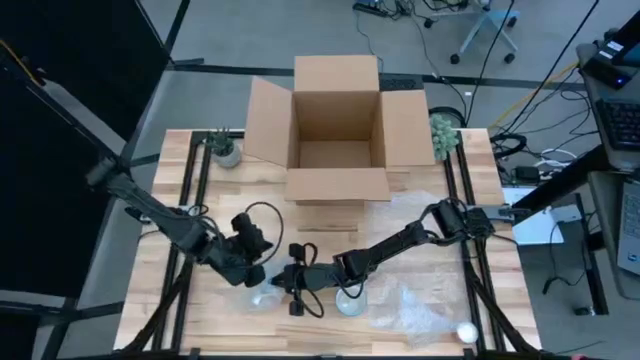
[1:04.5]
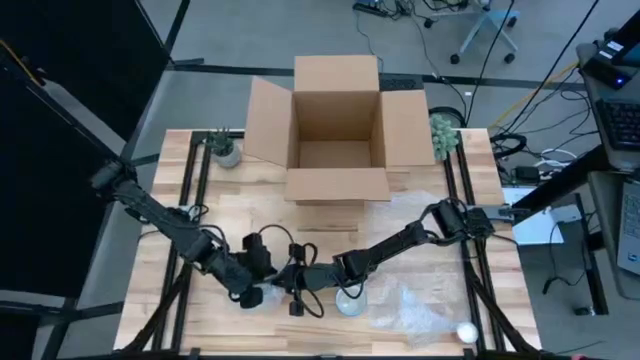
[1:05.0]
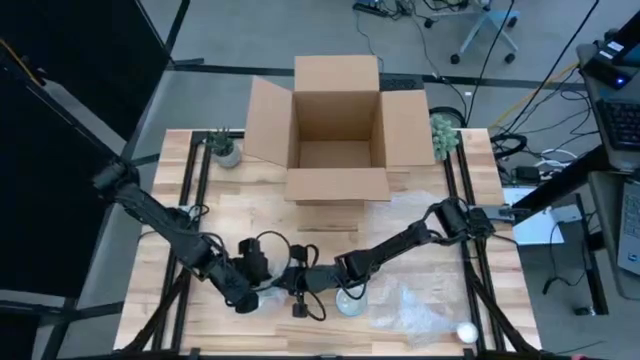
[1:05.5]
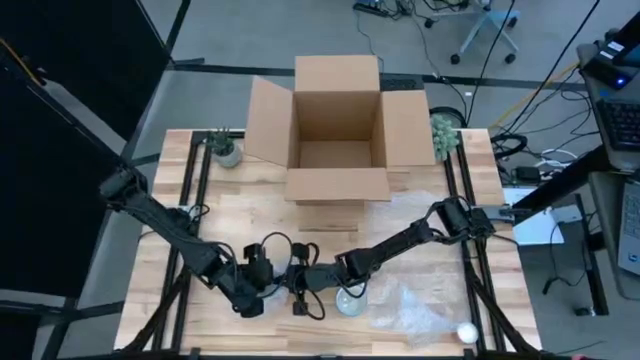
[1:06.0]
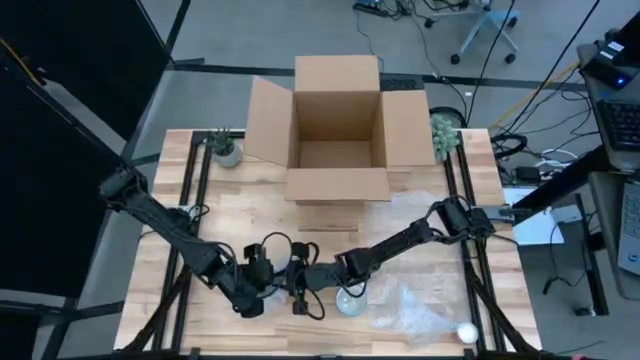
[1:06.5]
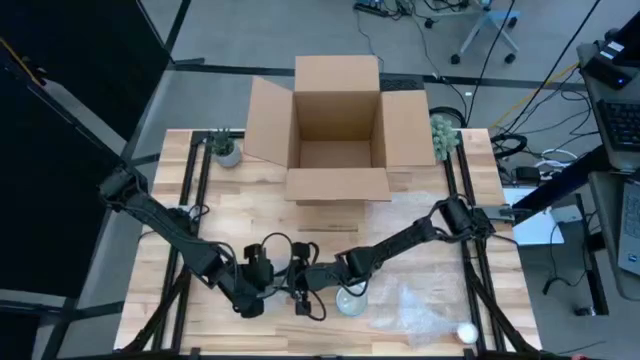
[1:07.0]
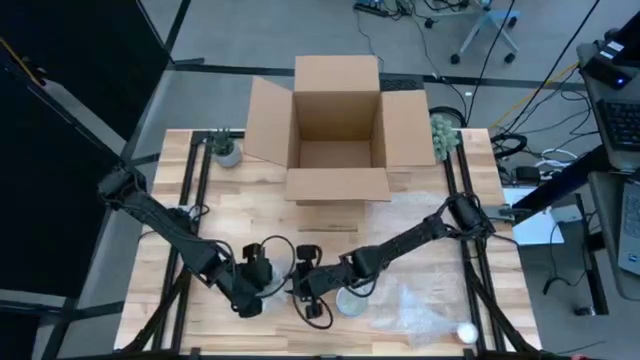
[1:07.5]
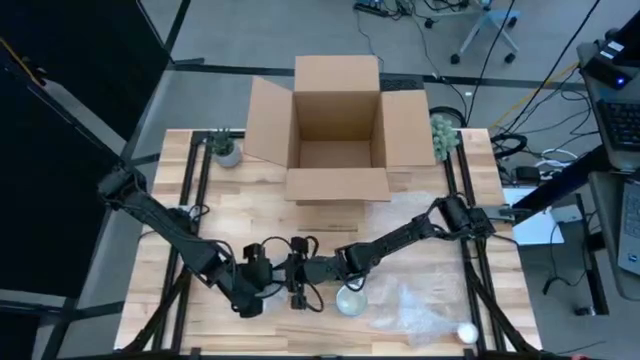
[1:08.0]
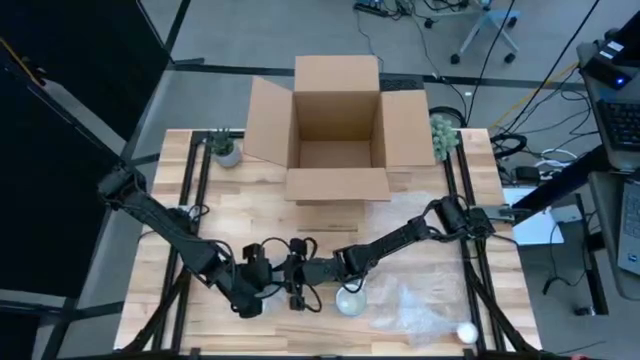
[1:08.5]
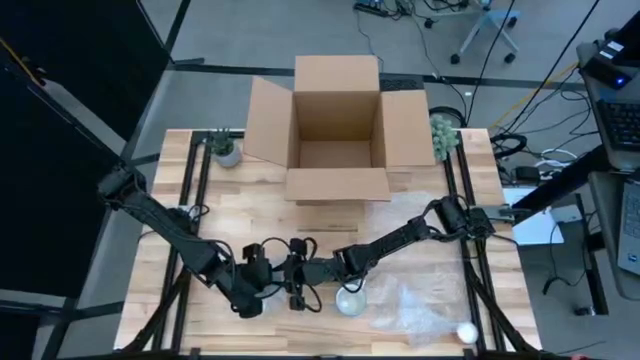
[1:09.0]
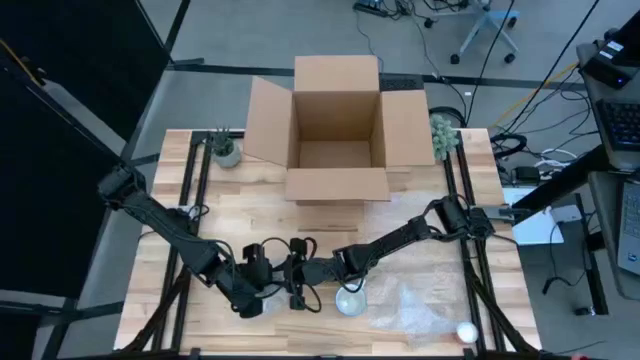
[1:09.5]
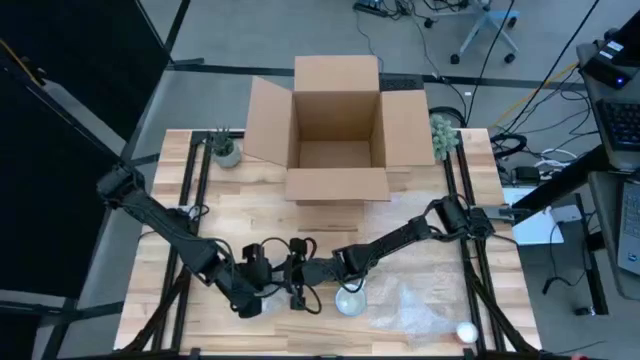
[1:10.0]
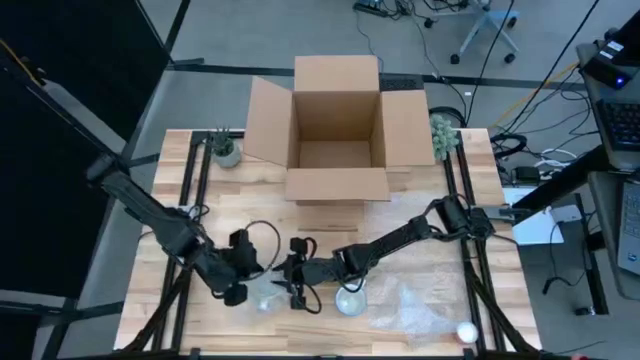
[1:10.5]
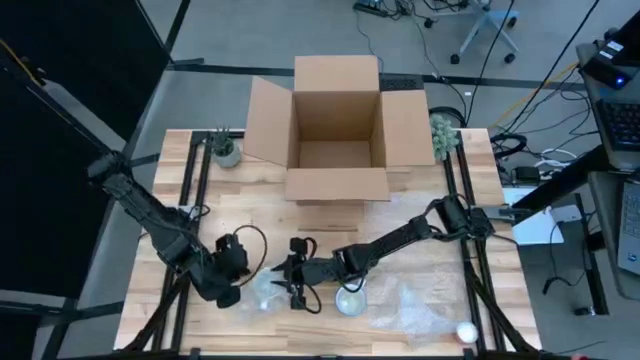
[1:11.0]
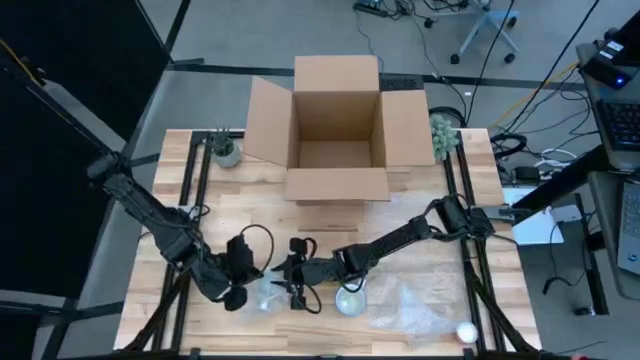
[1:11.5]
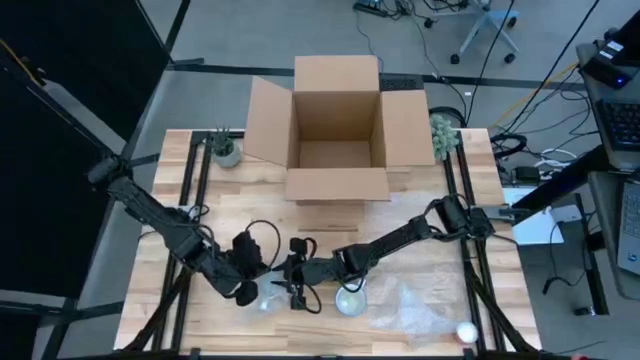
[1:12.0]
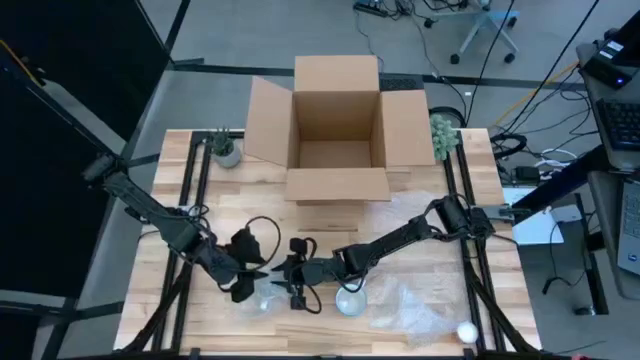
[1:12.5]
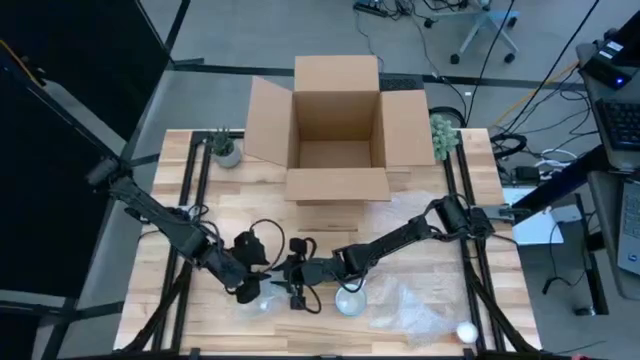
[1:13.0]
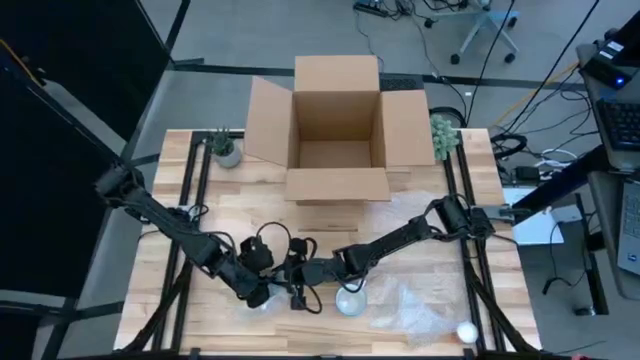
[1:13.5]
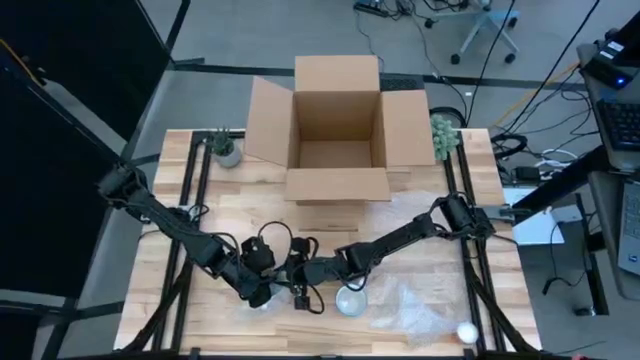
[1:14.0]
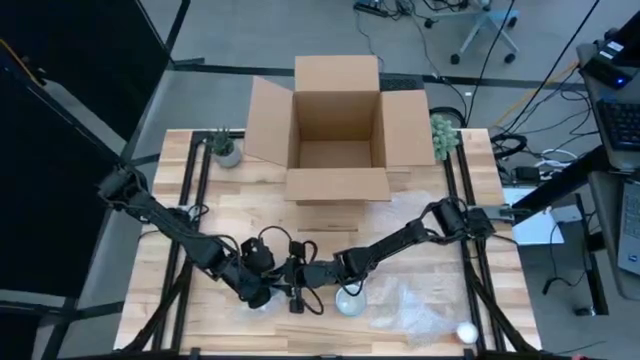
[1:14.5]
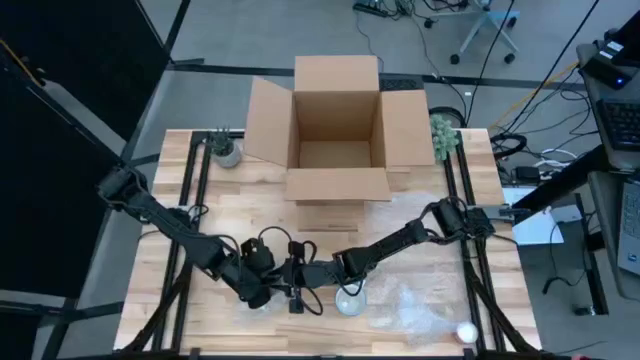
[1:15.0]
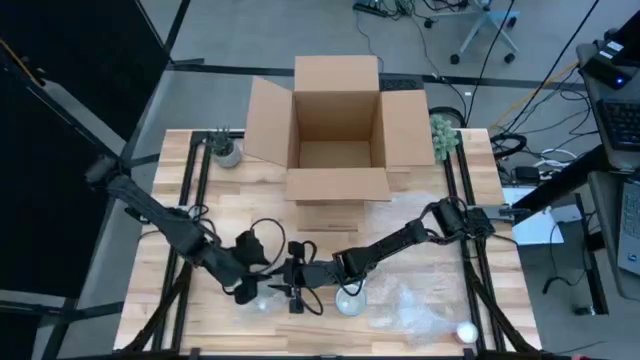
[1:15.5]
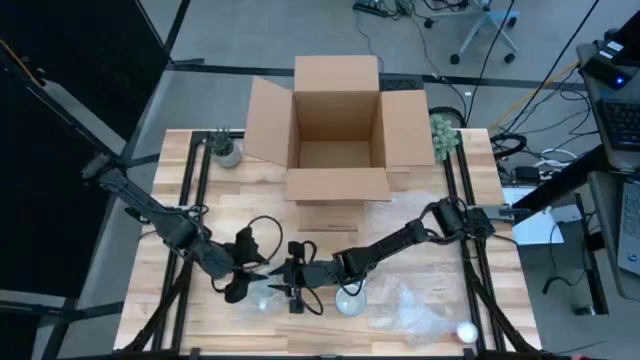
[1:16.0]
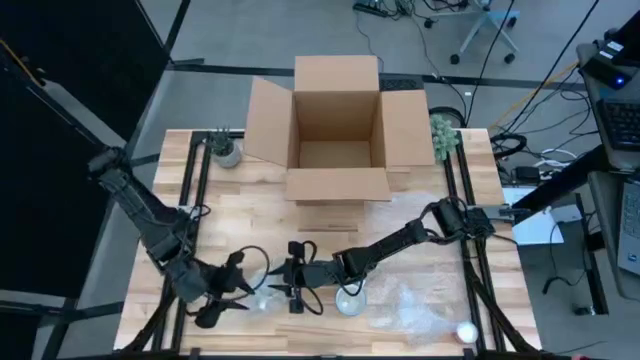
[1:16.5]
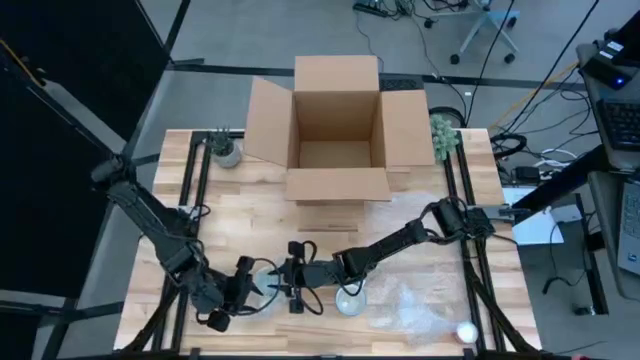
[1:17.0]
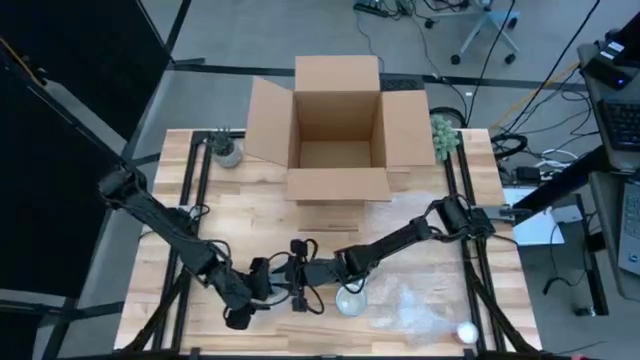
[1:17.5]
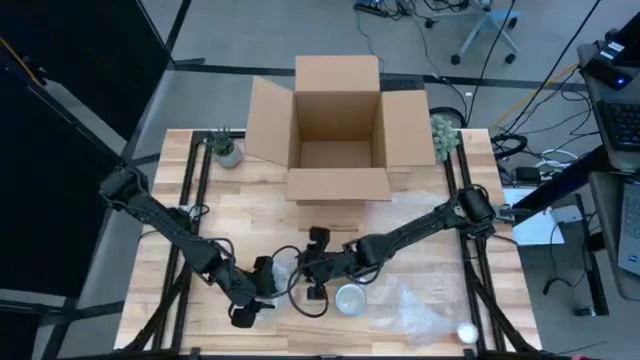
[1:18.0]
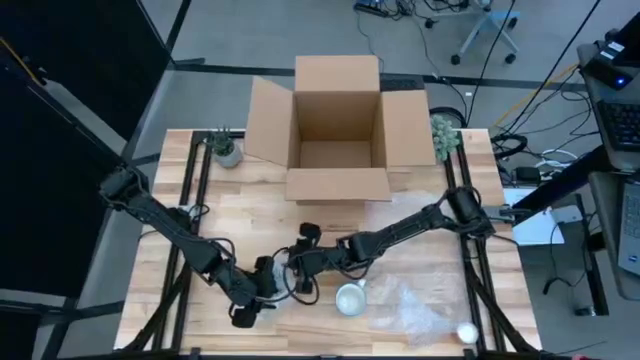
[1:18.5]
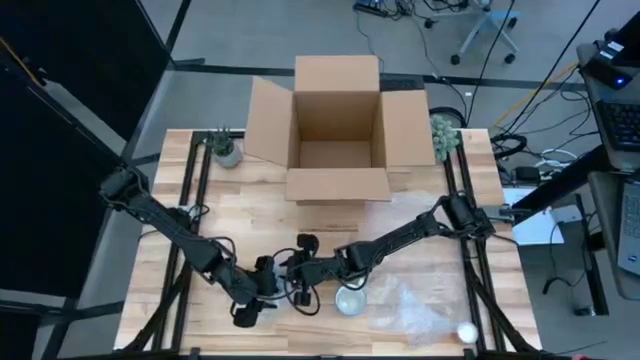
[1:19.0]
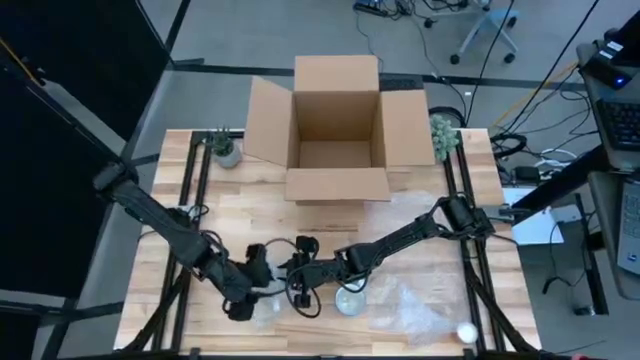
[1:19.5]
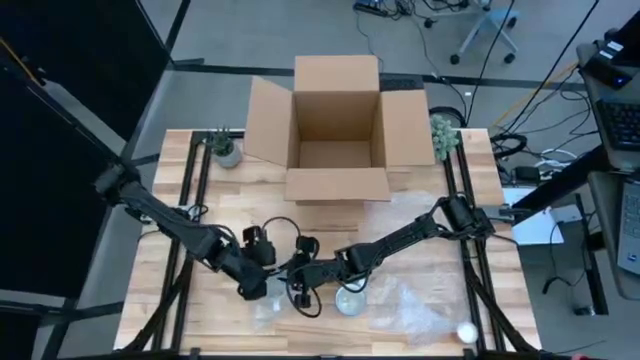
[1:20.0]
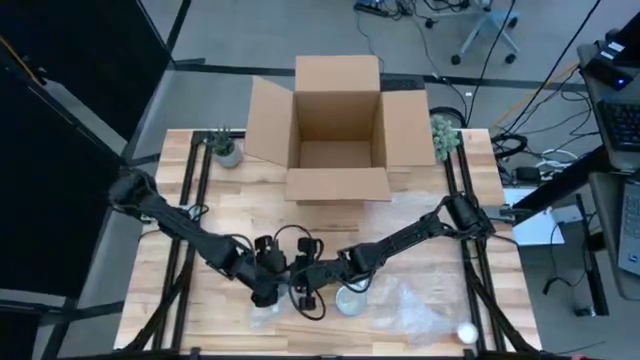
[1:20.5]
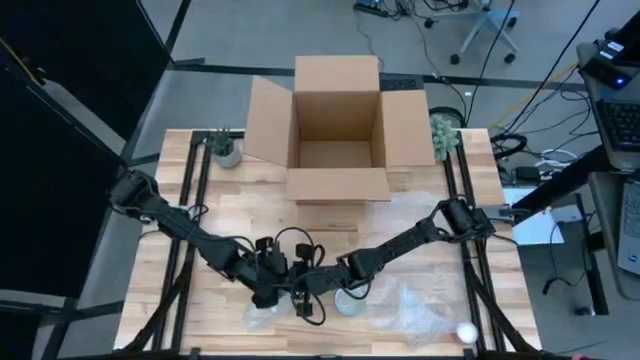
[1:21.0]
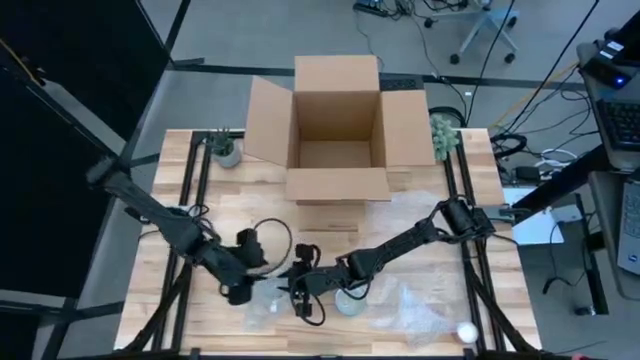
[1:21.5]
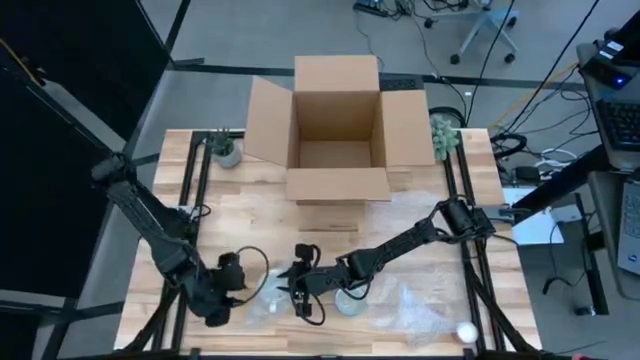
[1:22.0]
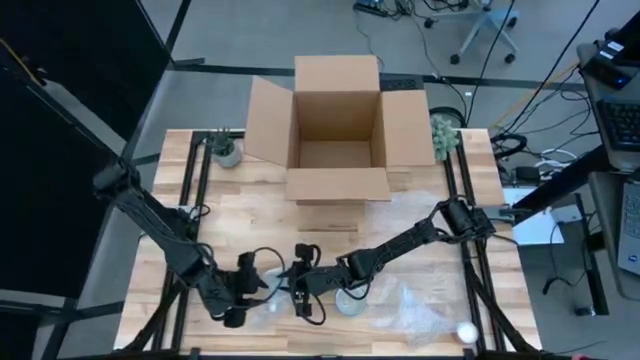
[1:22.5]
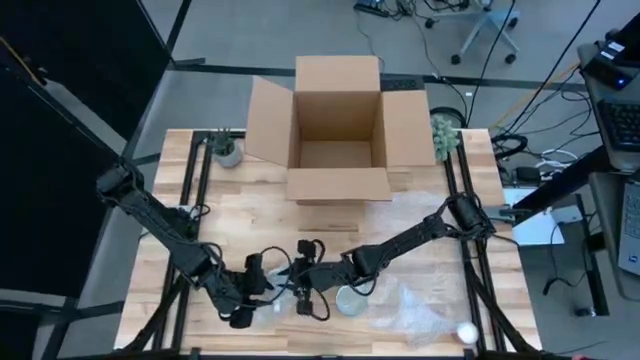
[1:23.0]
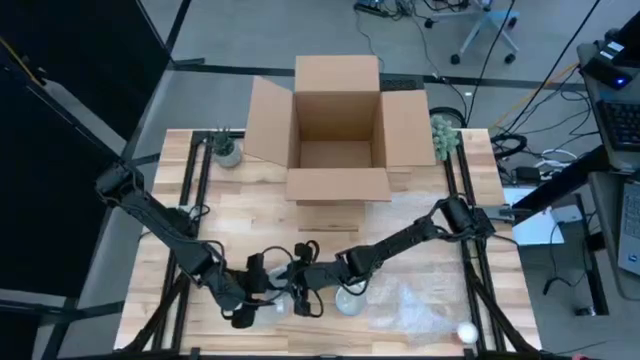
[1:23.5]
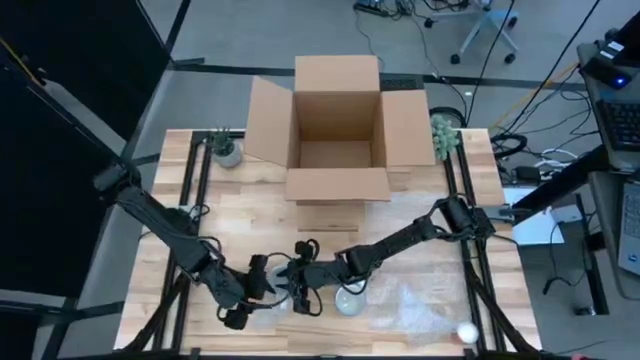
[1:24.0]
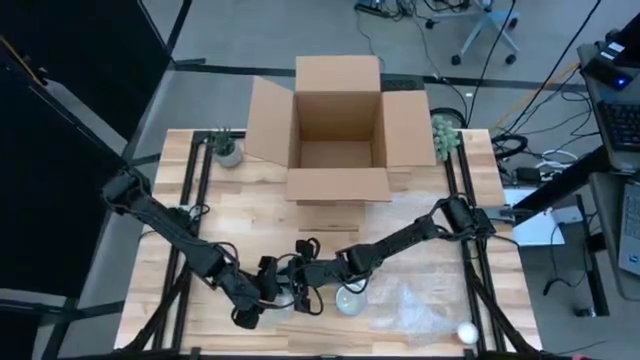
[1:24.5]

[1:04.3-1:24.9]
Task: wrap mug
Wrap the yellow mug with the left bubble wrap
